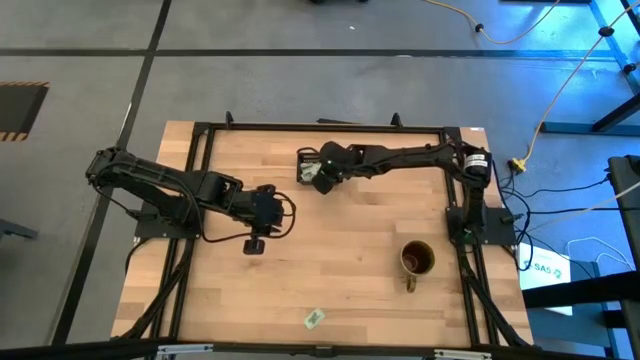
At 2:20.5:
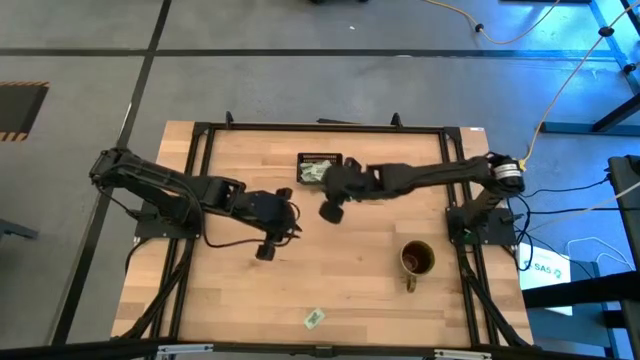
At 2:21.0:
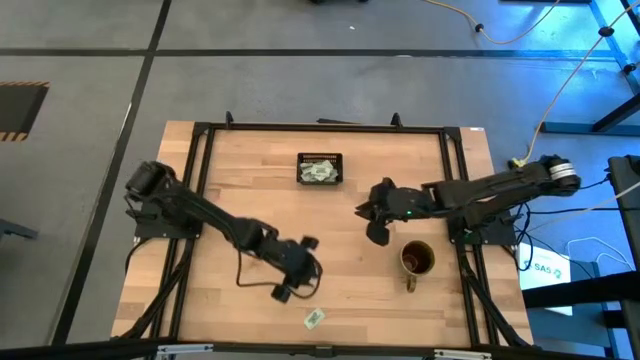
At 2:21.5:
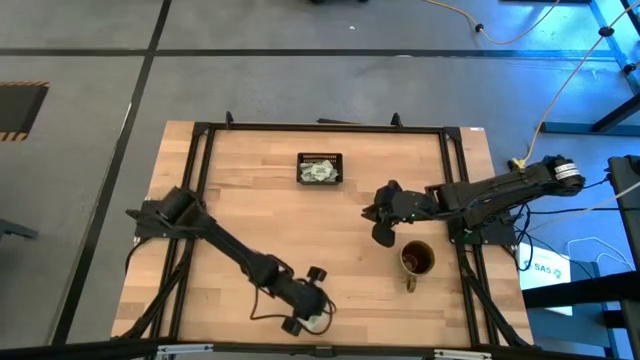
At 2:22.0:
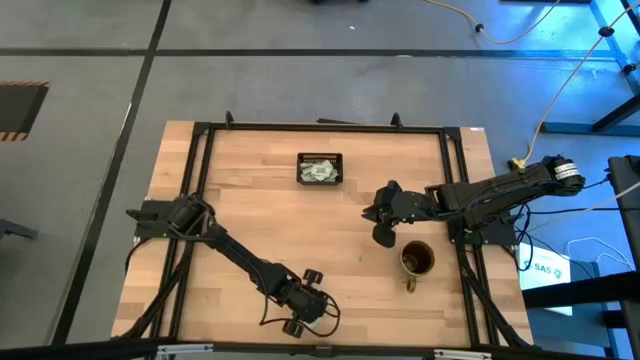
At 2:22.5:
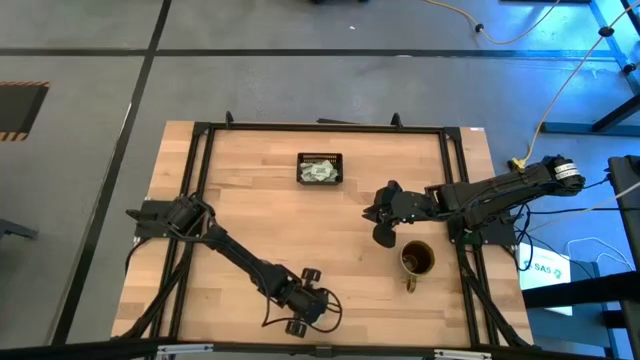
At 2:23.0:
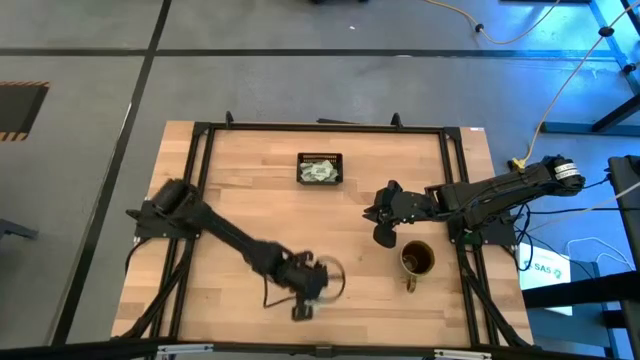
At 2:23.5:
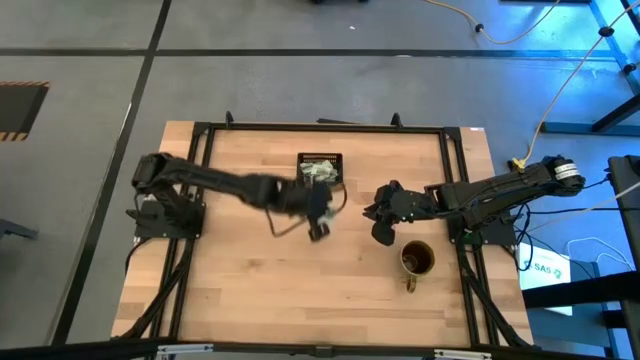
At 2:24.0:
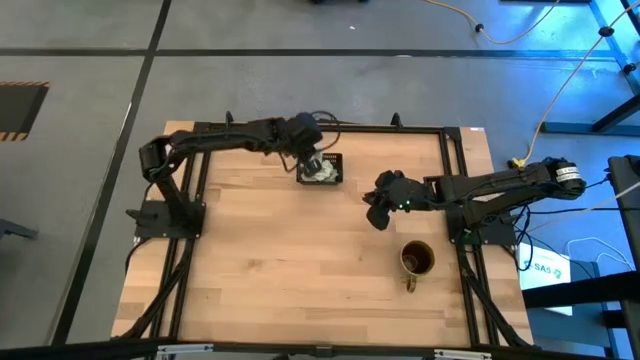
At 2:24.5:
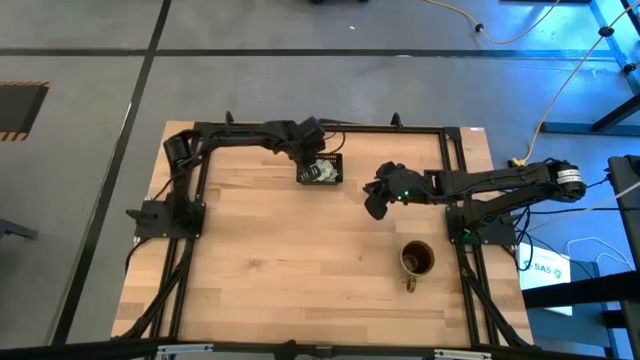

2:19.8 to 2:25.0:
Task: Pick and place Stevia / Truvia into bins
Put the white stevia packet into the black bin

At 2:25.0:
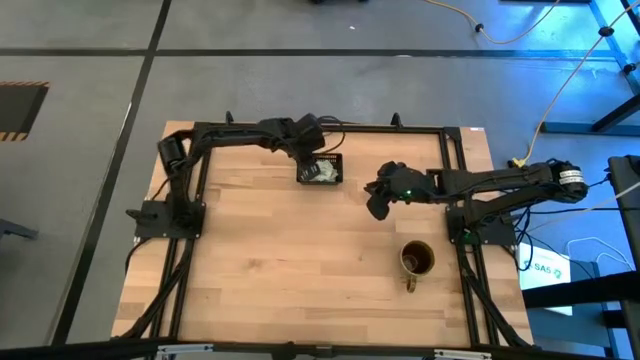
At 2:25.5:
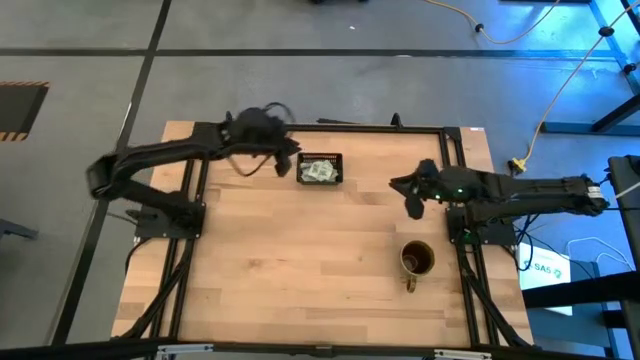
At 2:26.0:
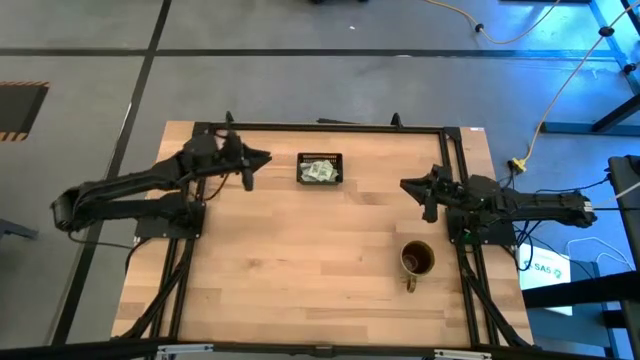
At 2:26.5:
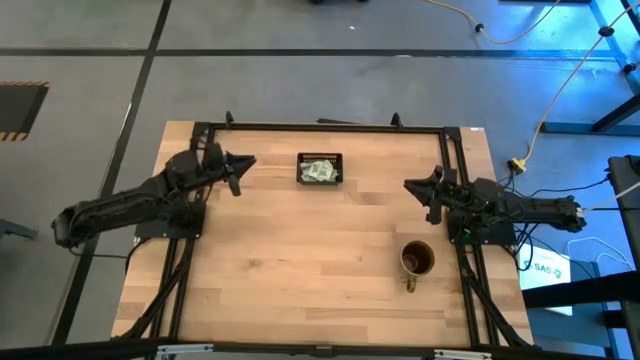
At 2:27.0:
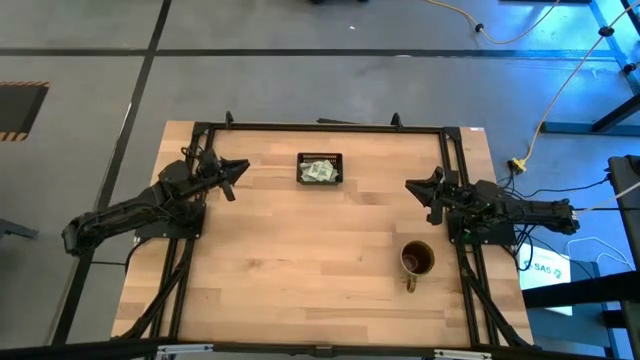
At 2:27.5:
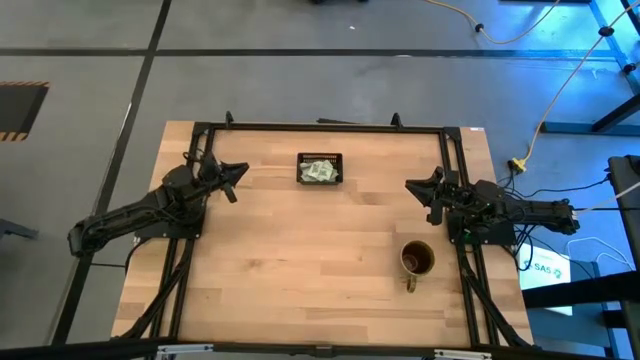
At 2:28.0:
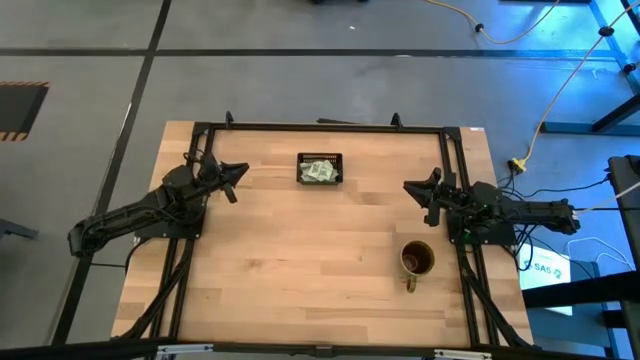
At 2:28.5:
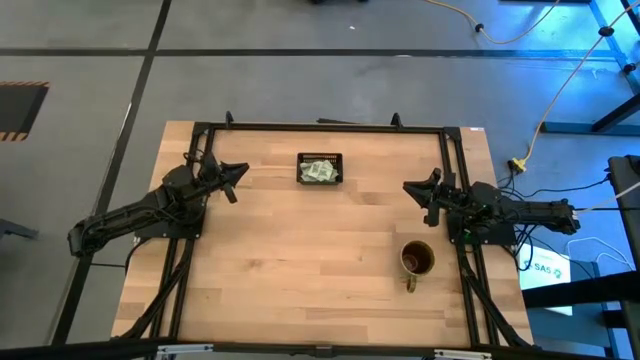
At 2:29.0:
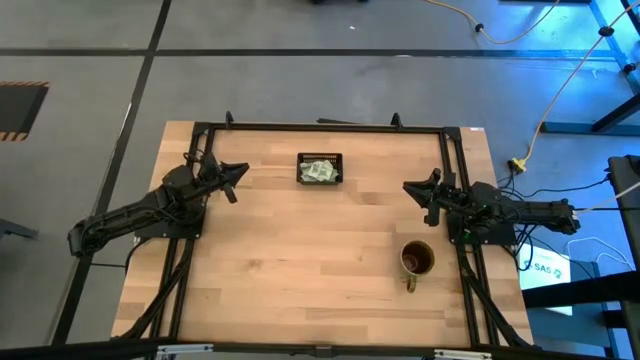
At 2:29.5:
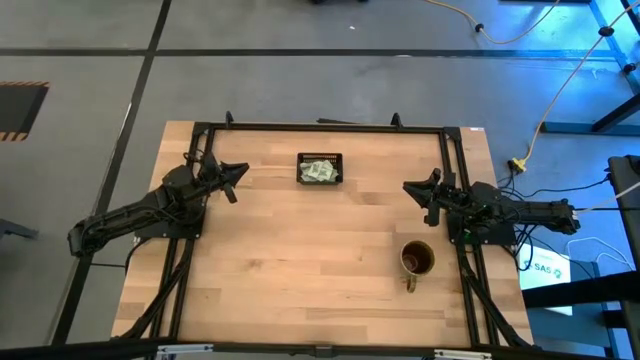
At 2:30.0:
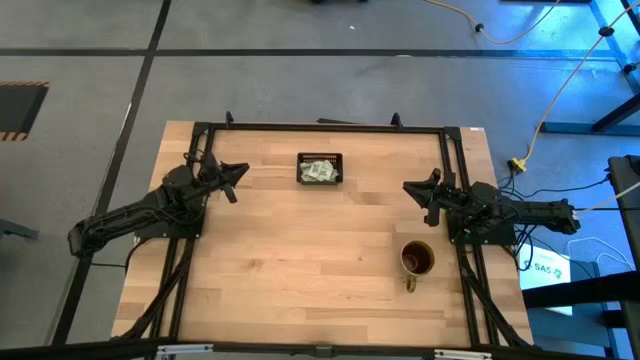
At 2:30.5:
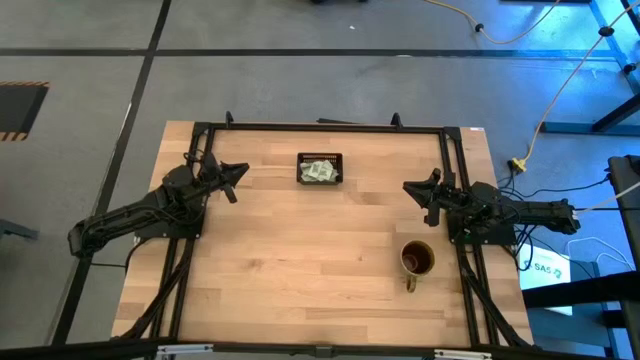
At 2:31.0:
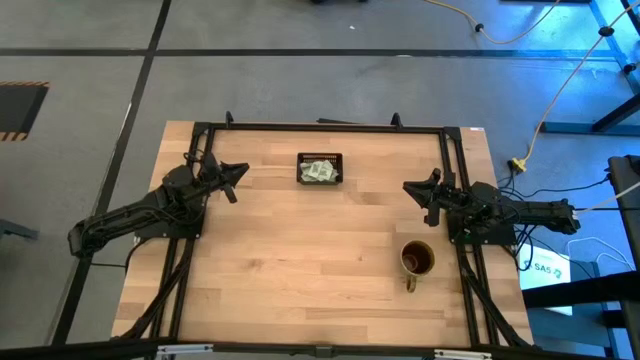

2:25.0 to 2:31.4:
Return to Home Position

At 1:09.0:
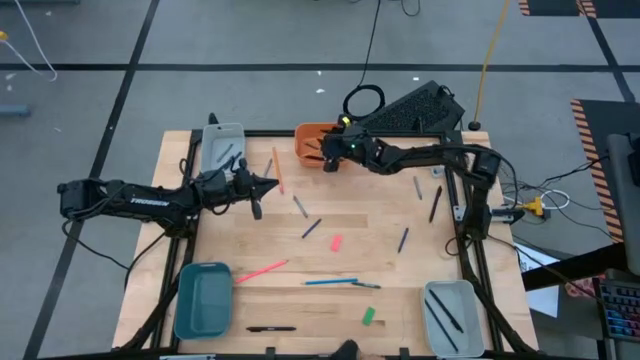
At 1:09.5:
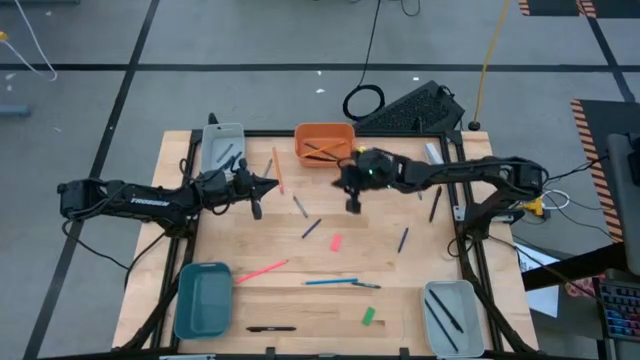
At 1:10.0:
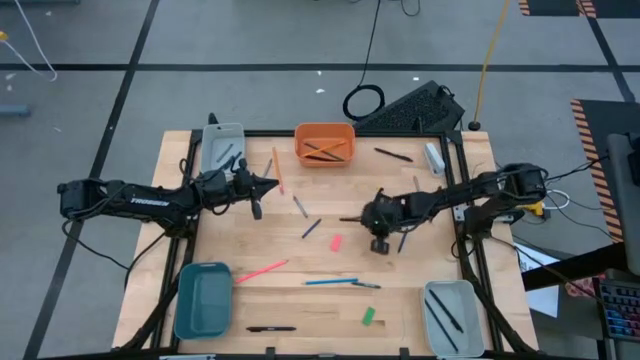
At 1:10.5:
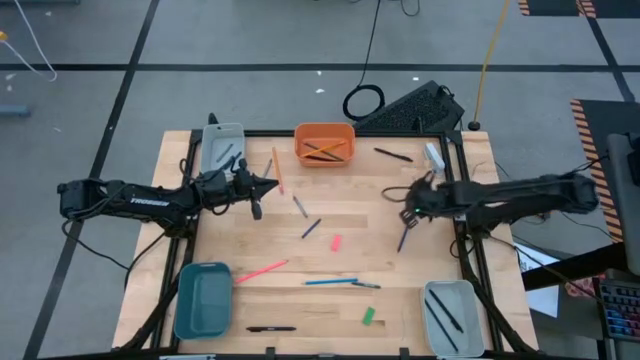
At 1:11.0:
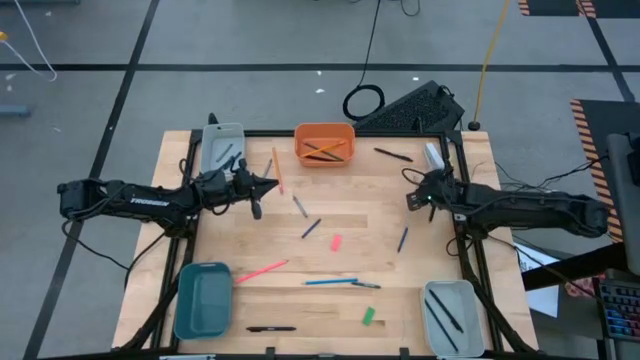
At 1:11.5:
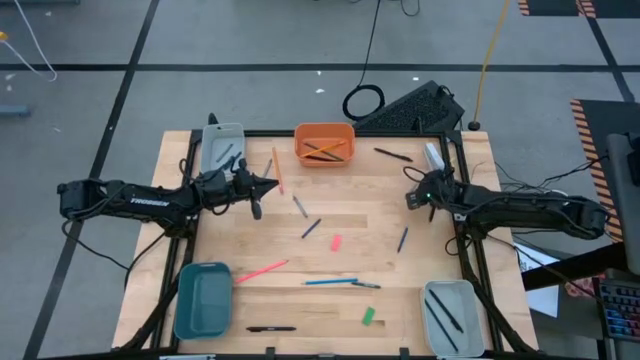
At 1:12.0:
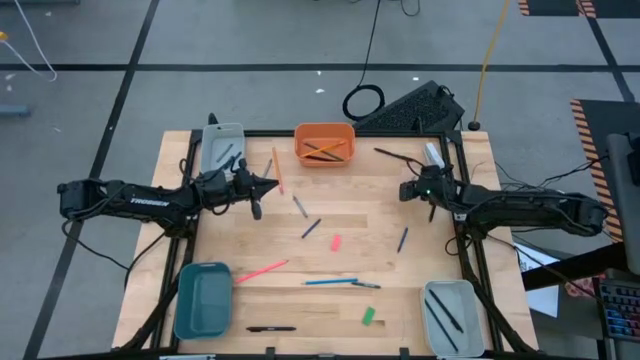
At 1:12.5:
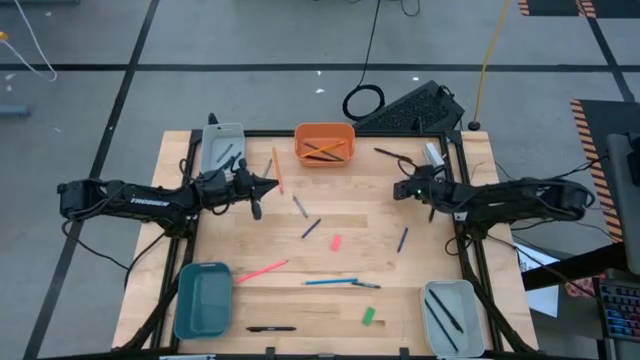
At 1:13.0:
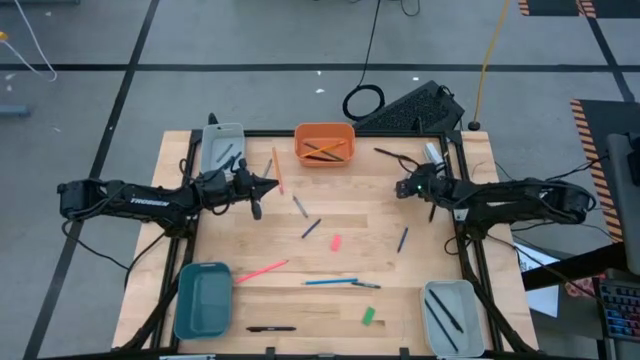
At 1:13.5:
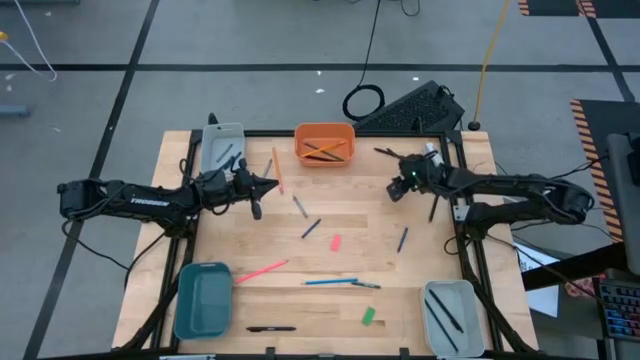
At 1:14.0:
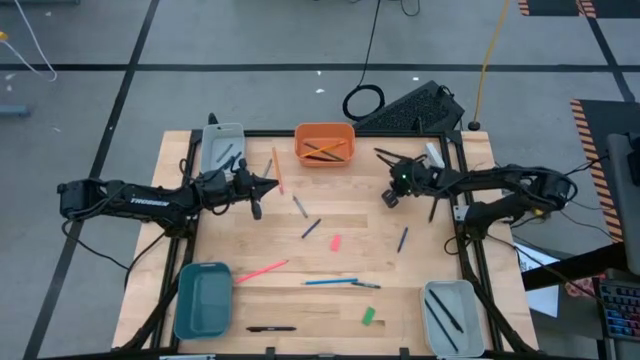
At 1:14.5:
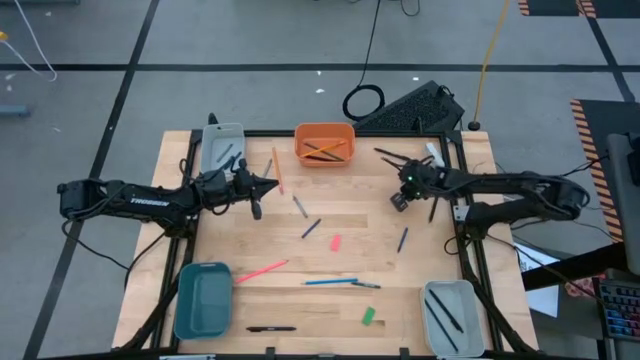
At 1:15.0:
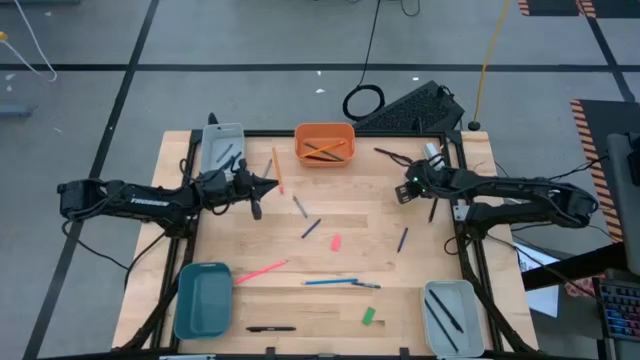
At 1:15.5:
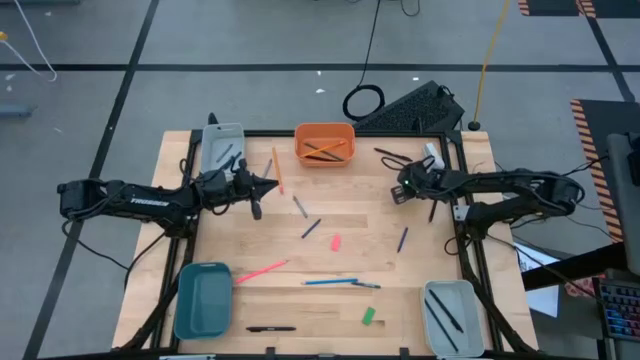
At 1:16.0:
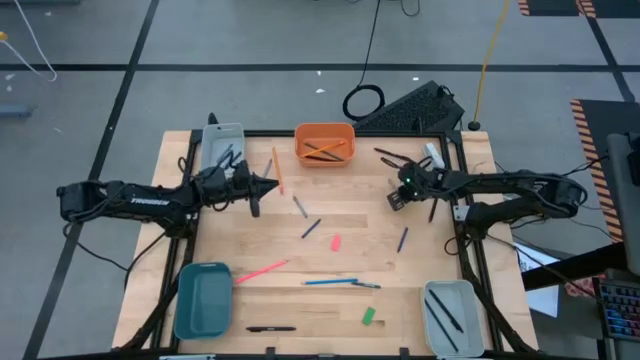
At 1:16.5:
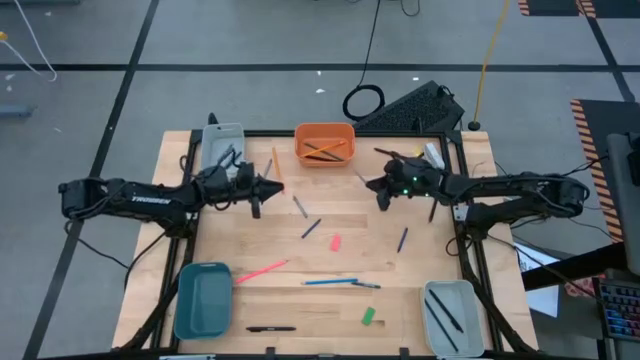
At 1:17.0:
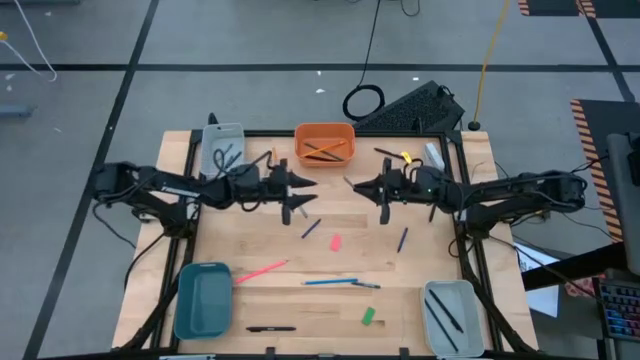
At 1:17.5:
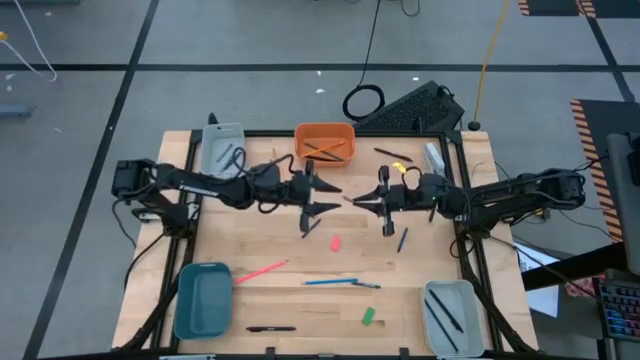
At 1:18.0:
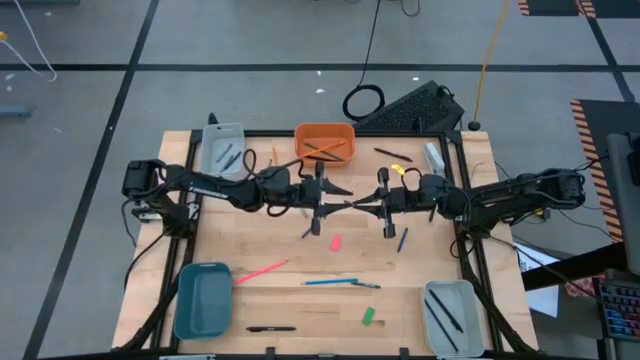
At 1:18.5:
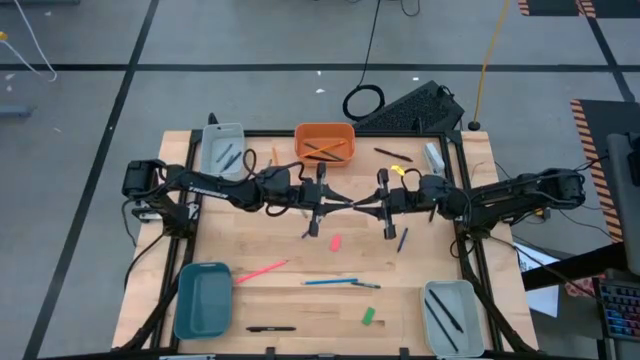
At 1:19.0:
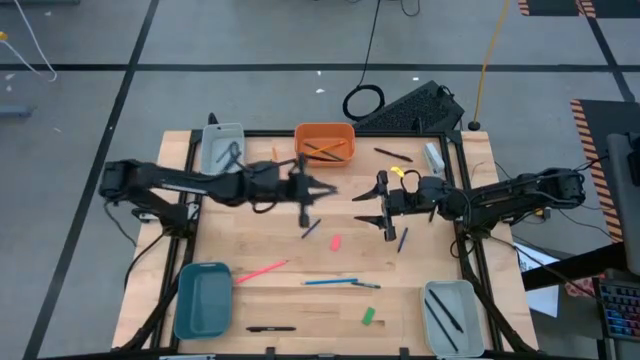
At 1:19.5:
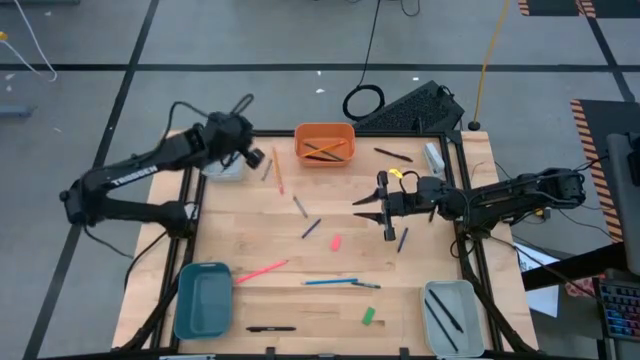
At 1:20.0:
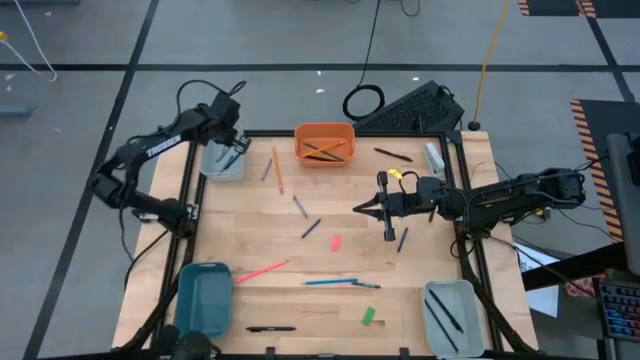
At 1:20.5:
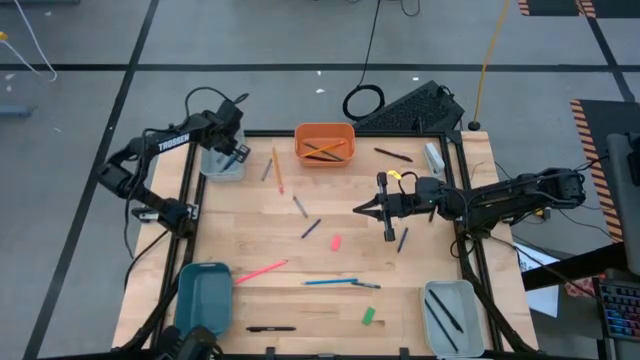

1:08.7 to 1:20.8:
Task: Sort crayons/erasers/pens/pencils in bins
Put the gray crayon into the top gray bin
